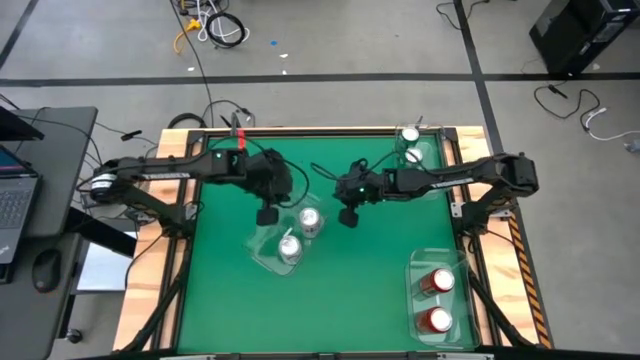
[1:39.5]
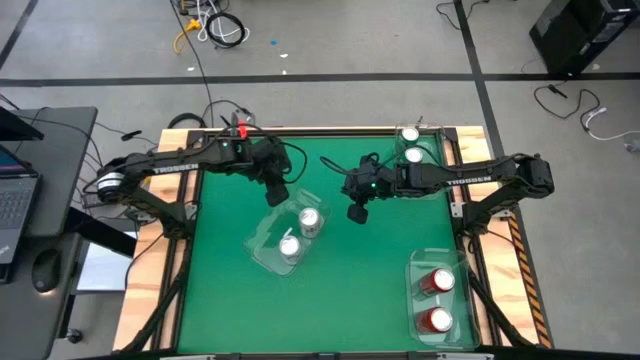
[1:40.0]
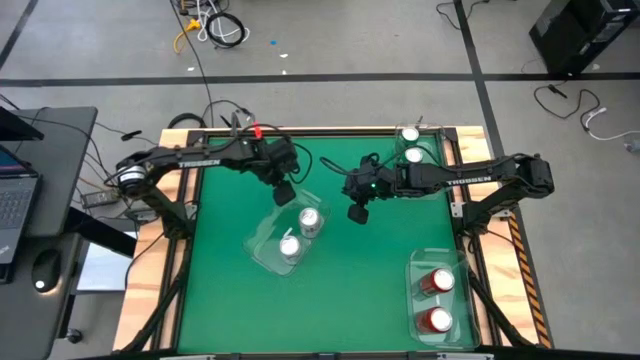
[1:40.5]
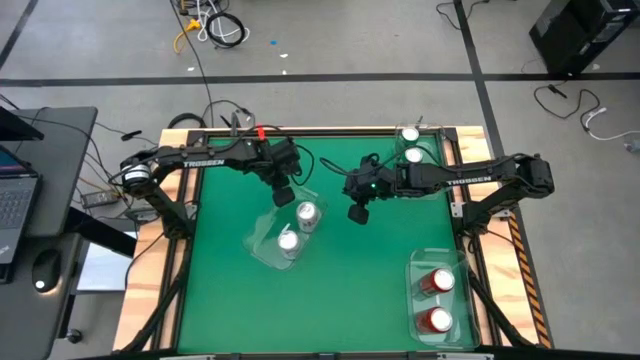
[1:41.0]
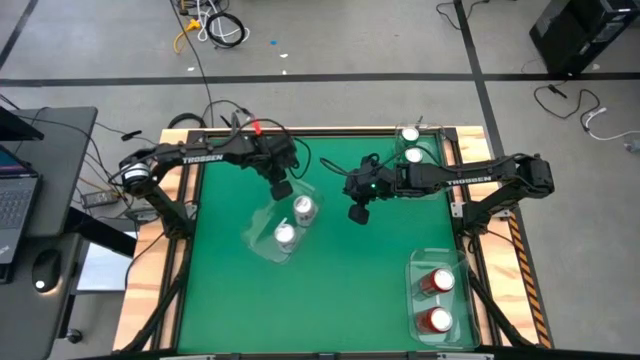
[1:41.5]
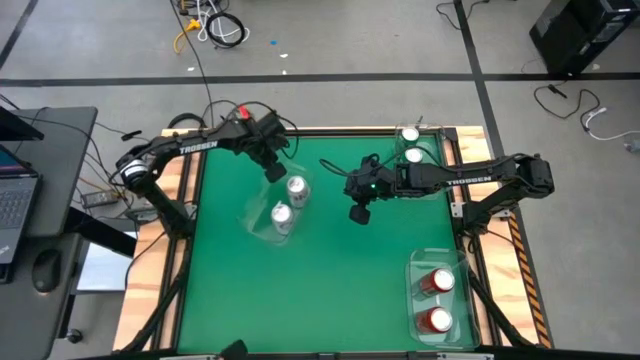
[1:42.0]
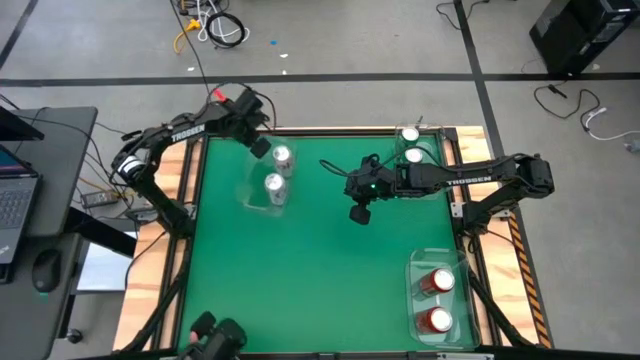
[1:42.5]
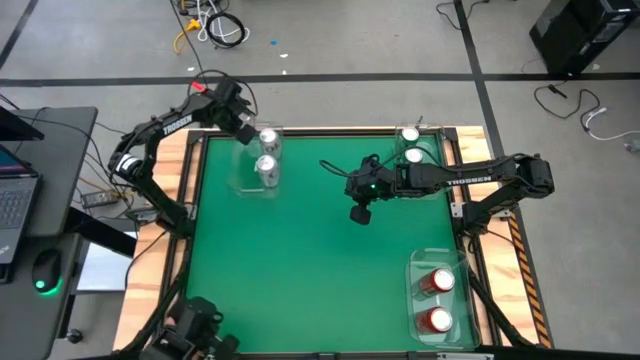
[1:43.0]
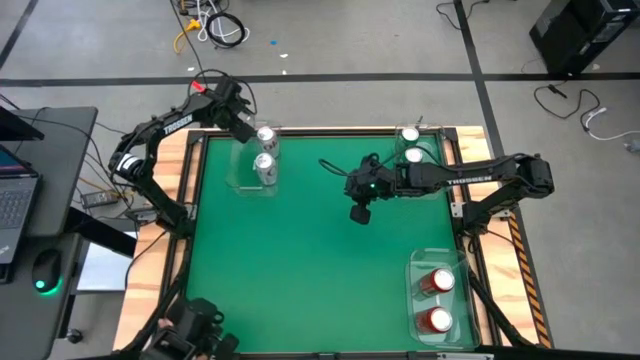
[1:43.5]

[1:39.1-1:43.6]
Task: Sort soda cans
Move the center transparent bin to the top left of the table

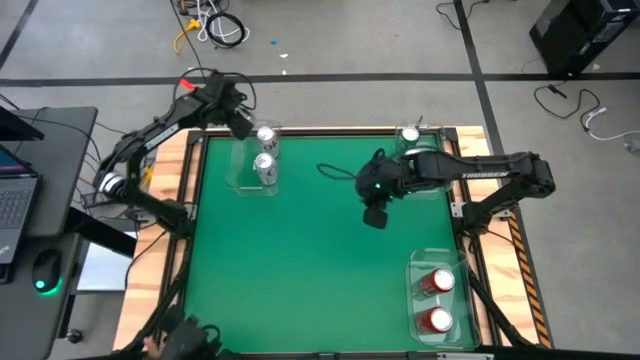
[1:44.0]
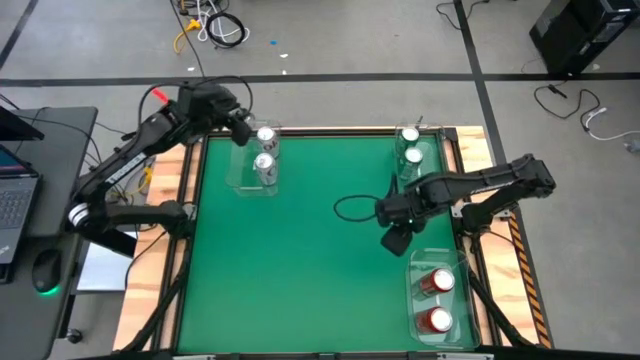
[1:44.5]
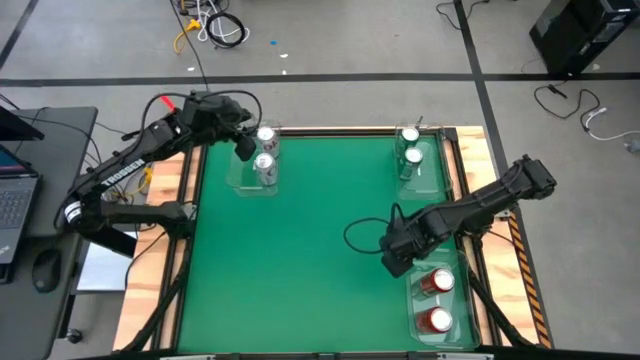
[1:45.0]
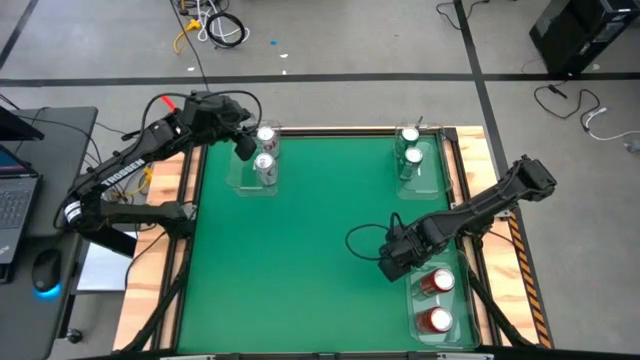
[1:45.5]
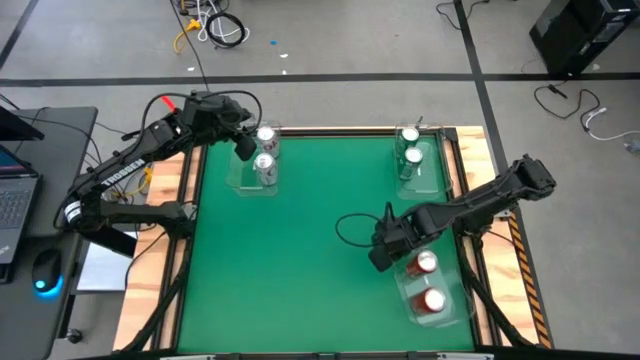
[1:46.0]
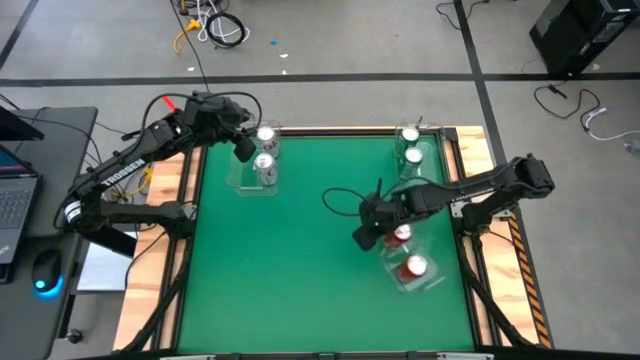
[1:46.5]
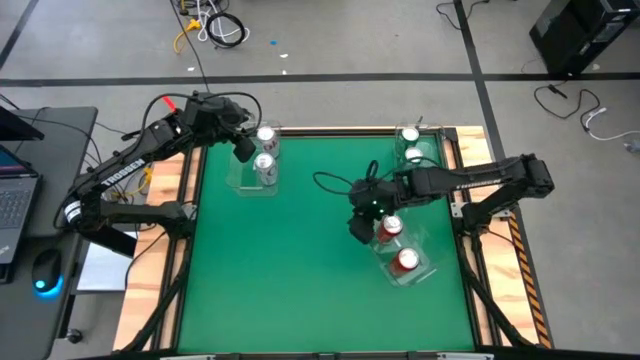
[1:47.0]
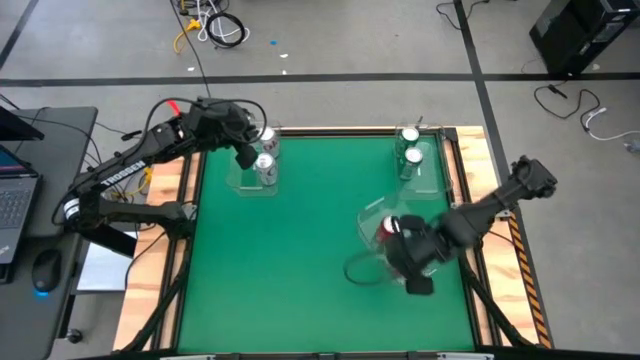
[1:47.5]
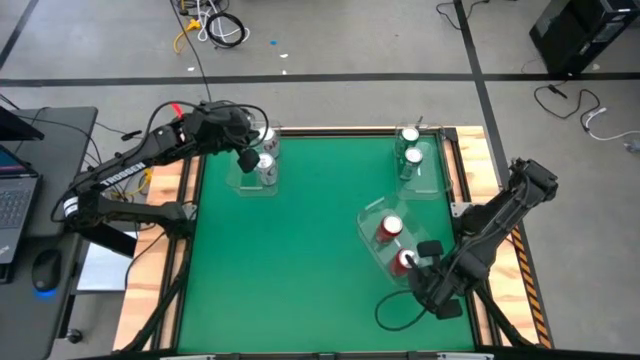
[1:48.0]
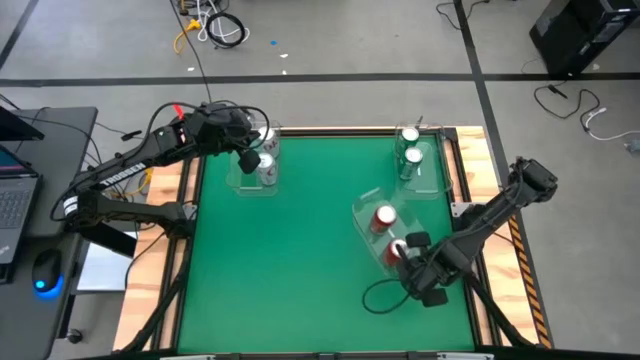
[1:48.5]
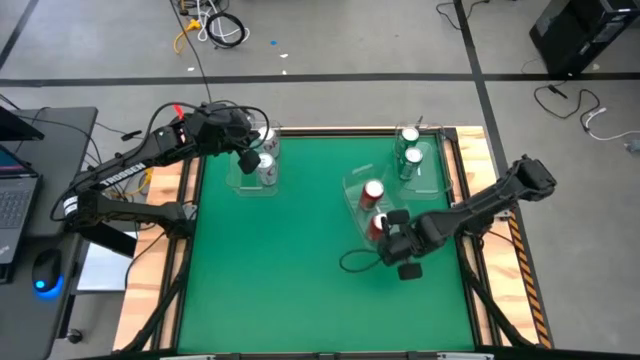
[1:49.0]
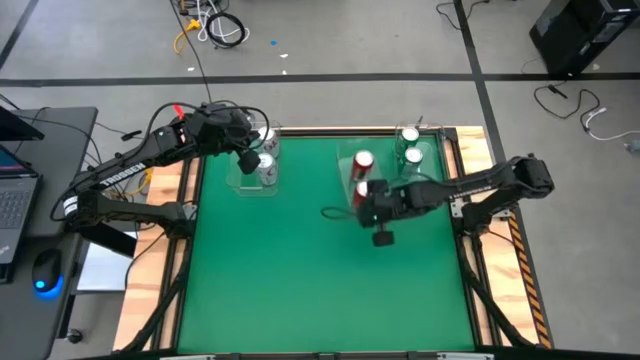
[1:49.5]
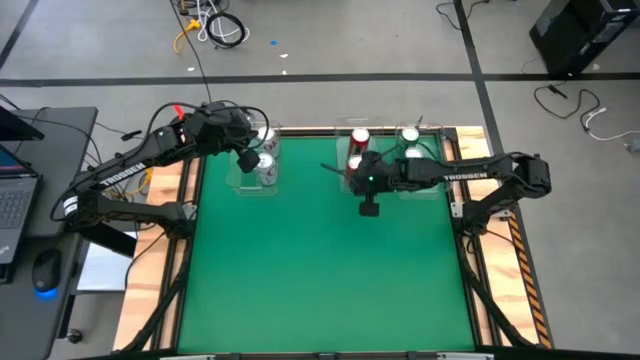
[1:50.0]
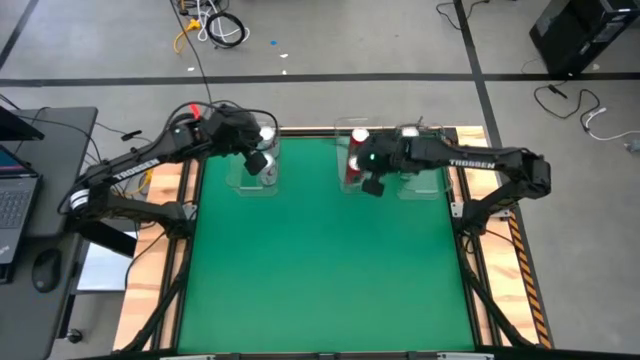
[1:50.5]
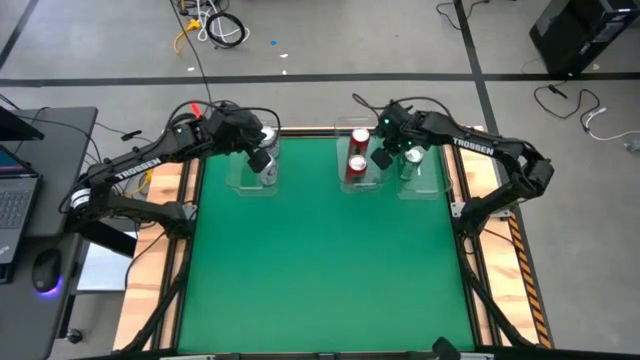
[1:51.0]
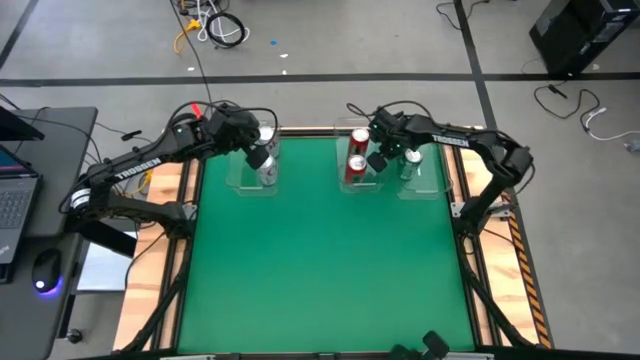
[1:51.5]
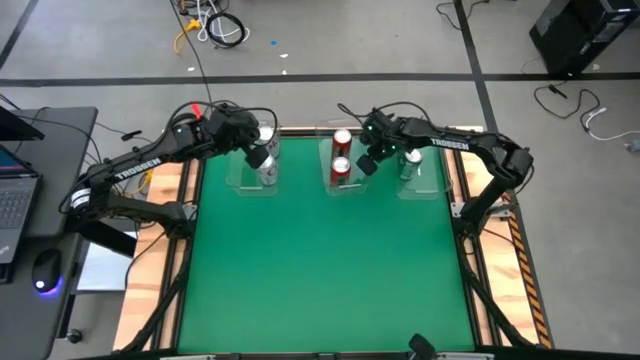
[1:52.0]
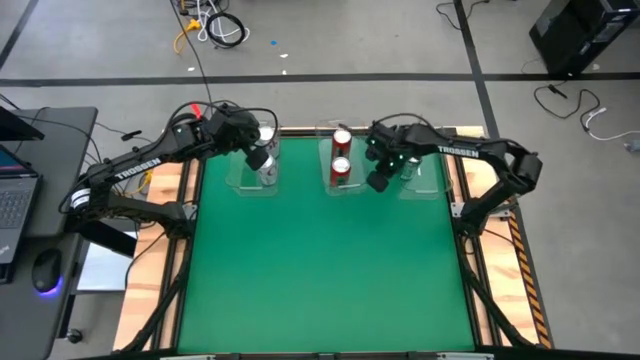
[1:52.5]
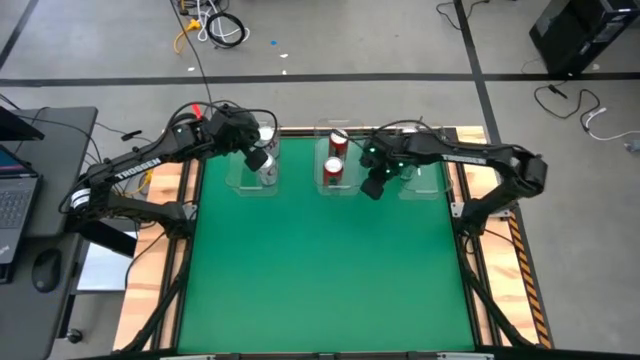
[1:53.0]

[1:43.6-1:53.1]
Move the right transparent bin to the top middle of the table

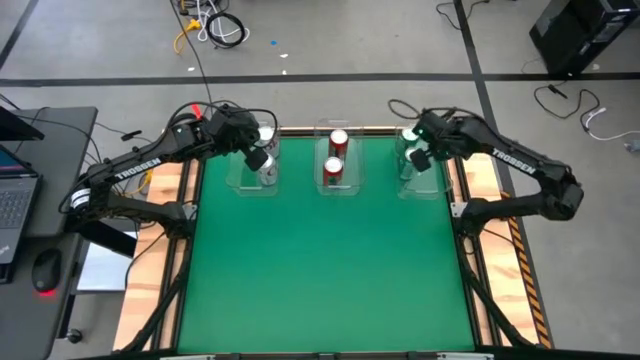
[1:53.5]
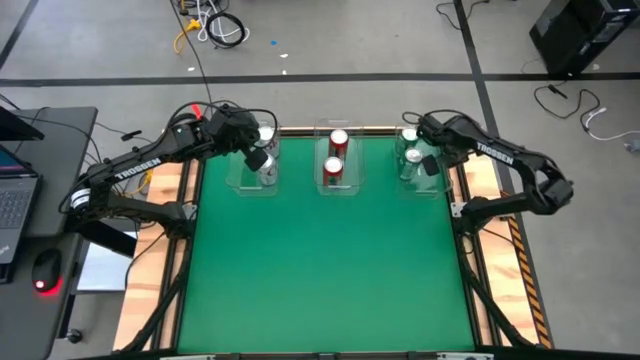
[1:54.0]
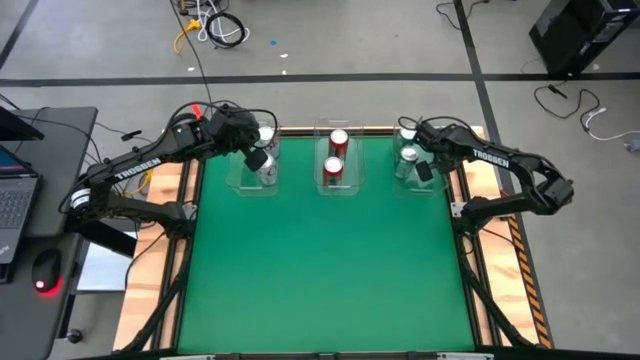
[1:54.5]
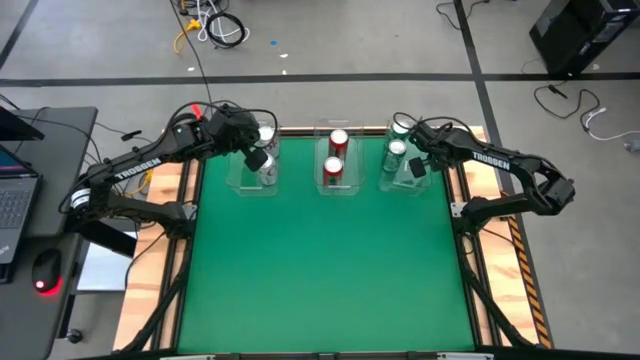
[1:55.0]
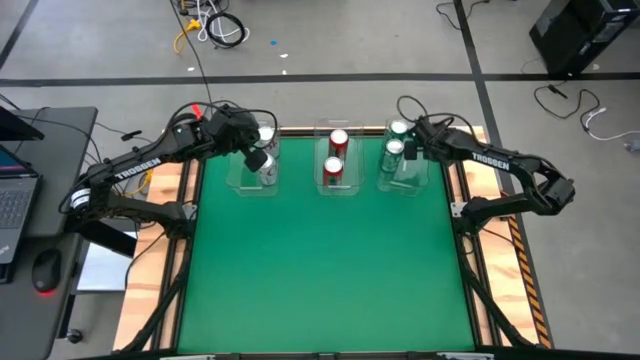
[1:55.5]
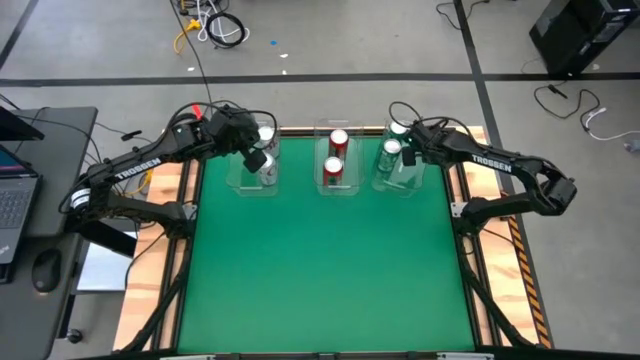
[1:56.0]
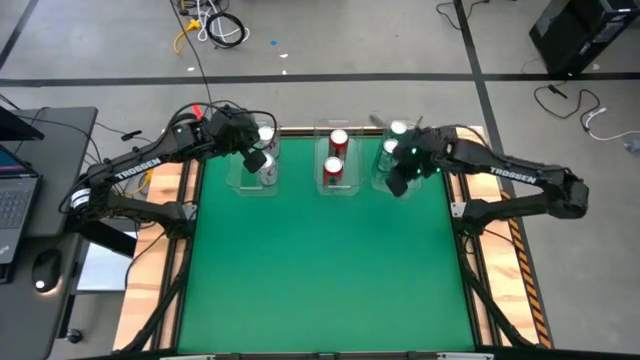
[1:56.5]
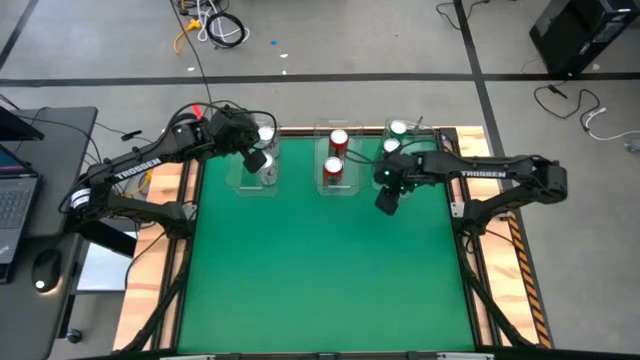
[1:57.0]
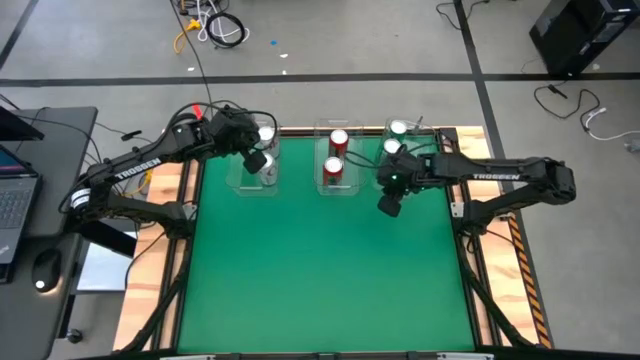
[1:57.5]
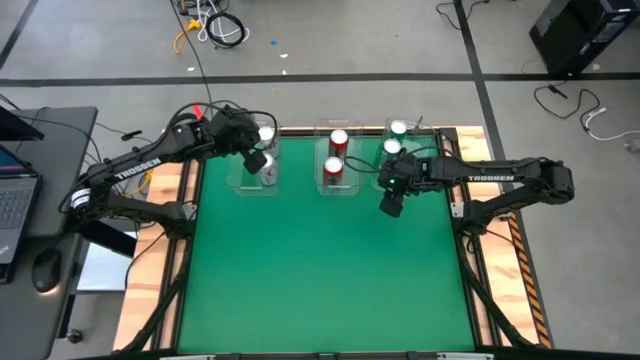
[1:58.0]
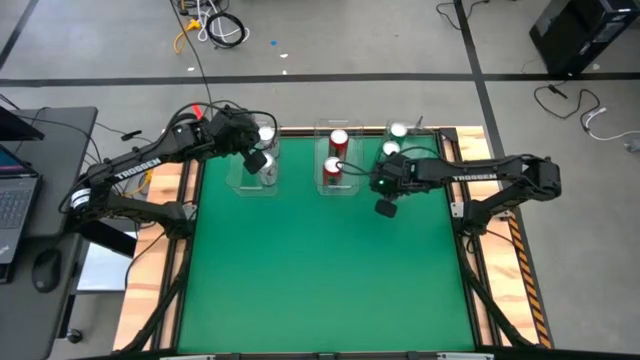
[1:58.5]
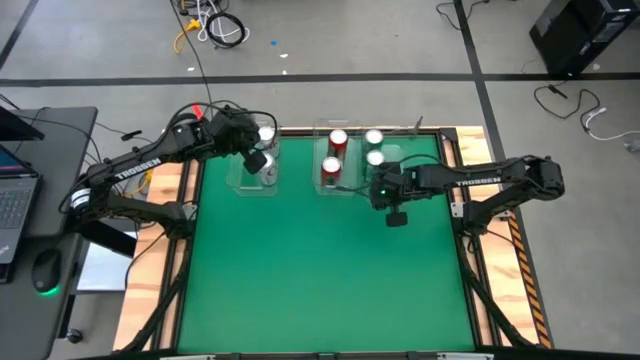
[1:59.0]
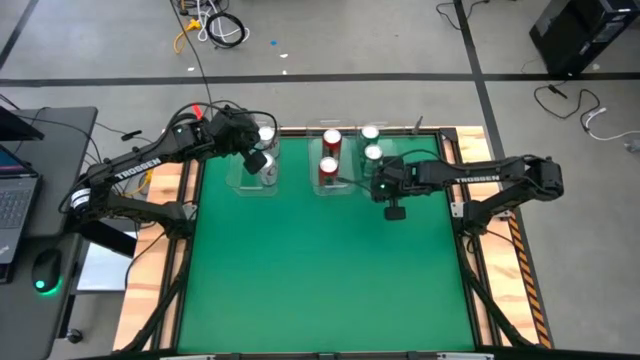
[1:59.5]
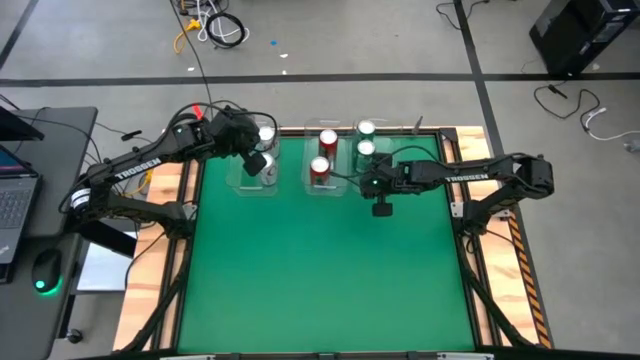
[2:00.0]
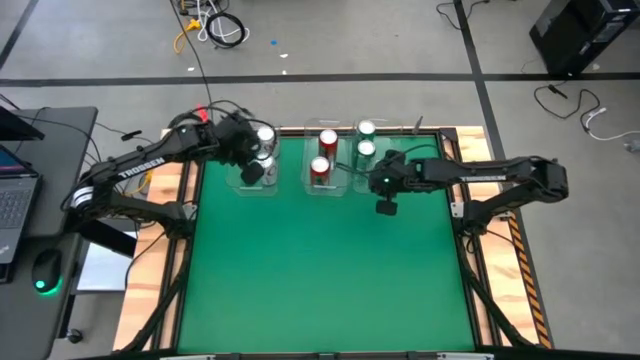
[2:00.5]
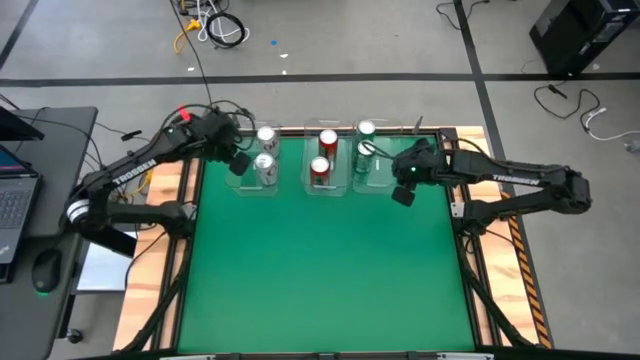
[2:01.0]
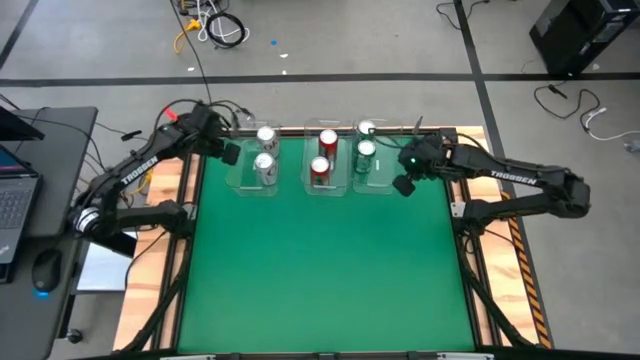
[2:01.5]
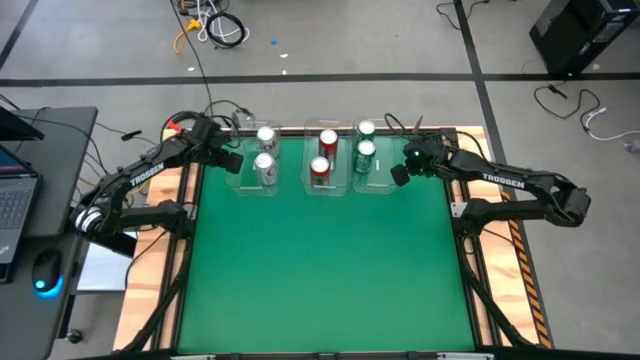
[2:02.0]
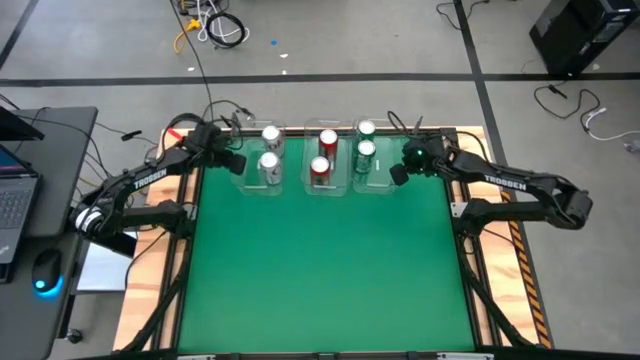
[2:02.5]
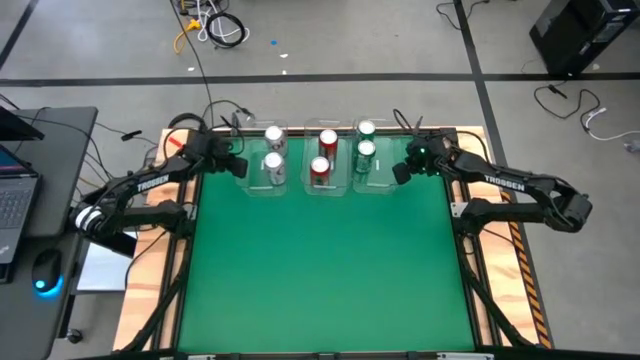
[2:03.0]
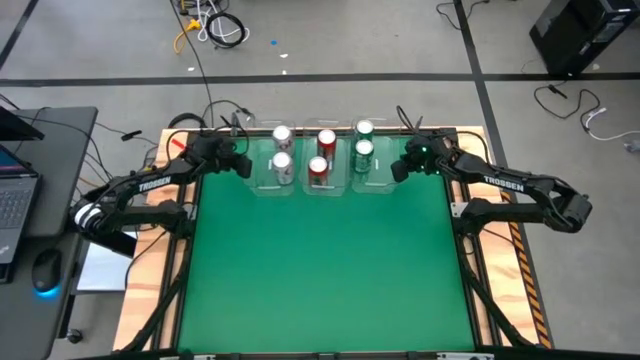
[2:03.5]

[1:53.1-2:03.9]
Adjust the transparent bins
